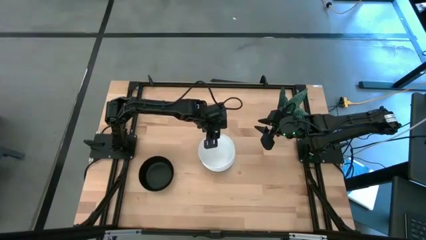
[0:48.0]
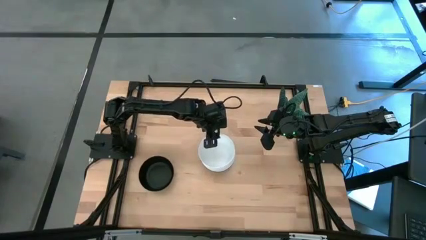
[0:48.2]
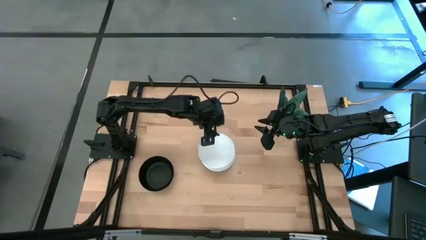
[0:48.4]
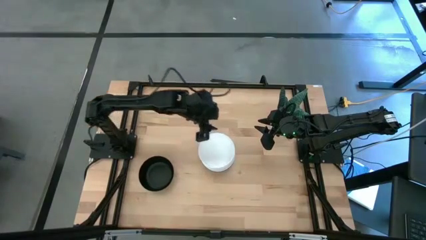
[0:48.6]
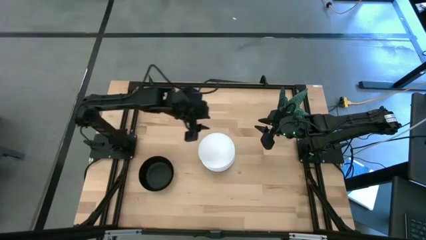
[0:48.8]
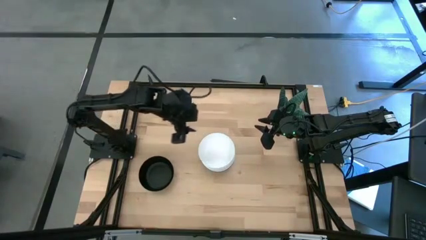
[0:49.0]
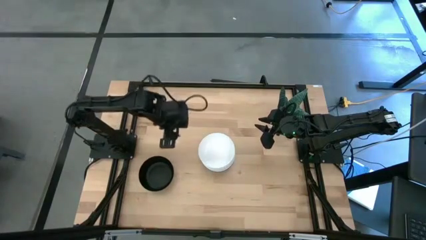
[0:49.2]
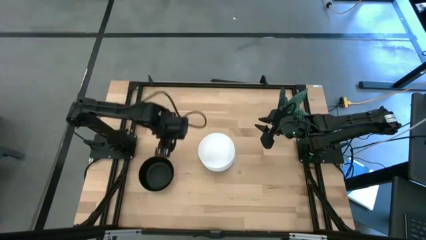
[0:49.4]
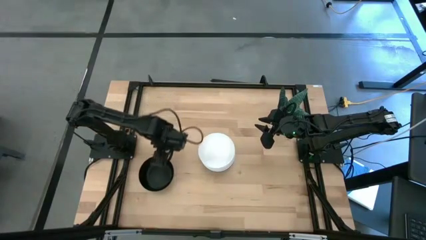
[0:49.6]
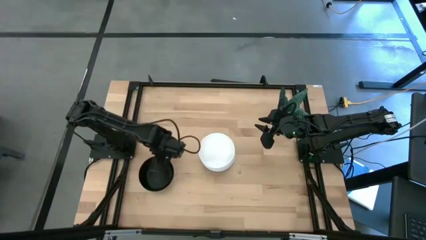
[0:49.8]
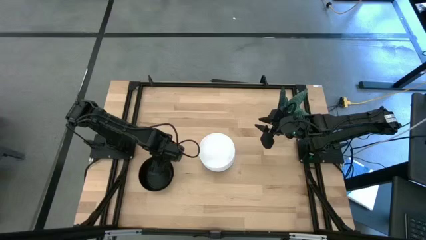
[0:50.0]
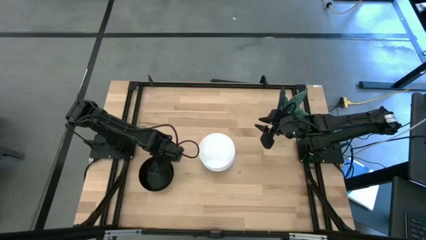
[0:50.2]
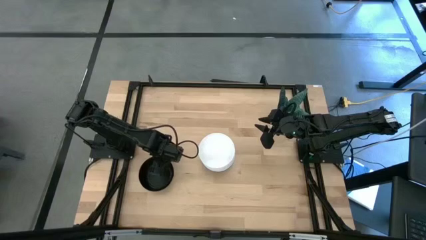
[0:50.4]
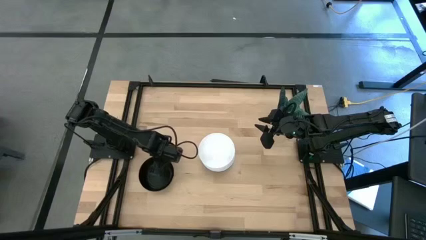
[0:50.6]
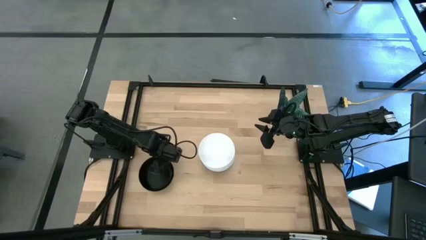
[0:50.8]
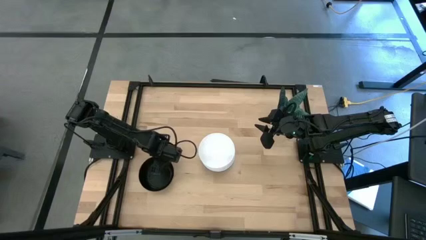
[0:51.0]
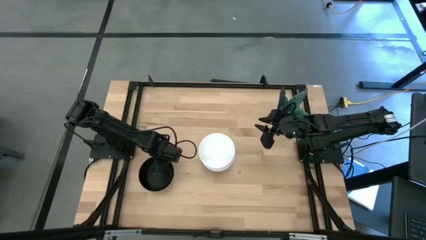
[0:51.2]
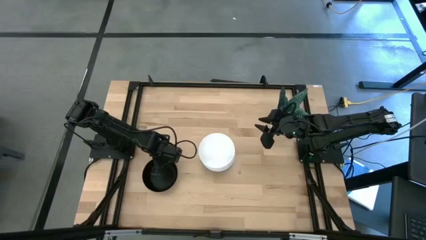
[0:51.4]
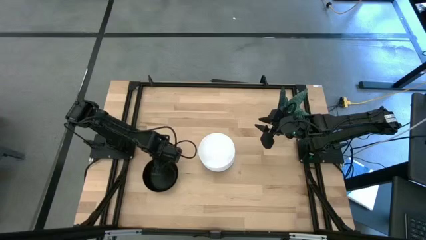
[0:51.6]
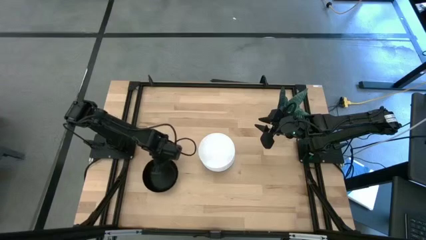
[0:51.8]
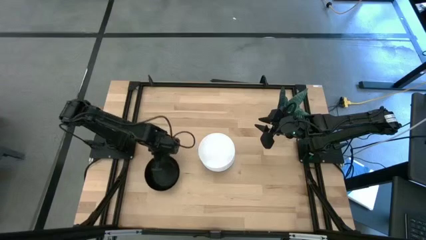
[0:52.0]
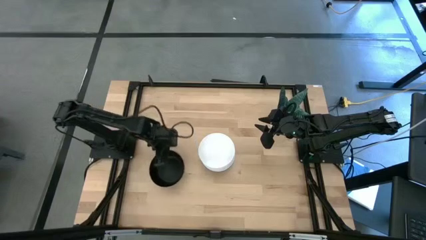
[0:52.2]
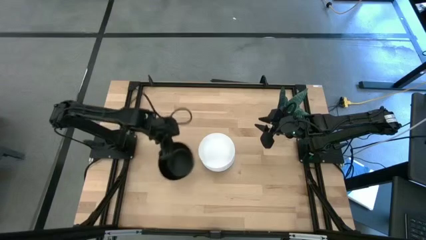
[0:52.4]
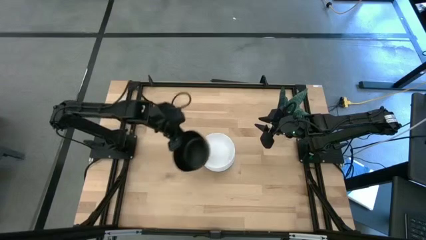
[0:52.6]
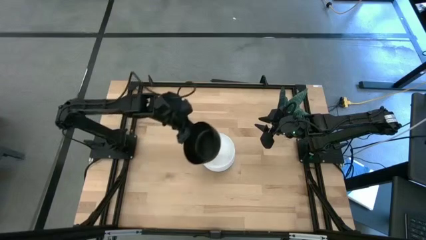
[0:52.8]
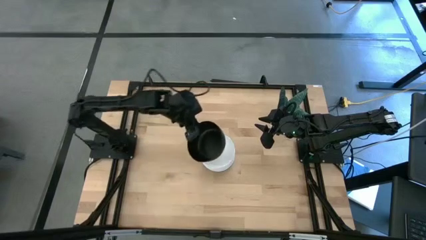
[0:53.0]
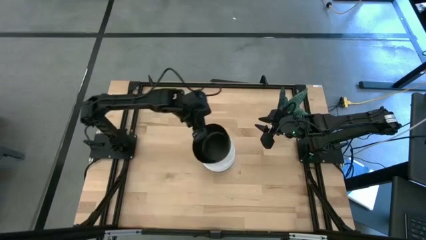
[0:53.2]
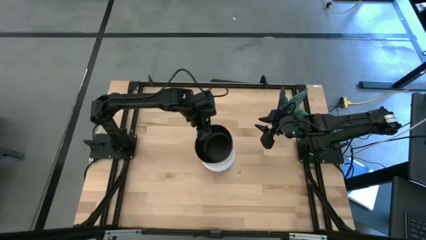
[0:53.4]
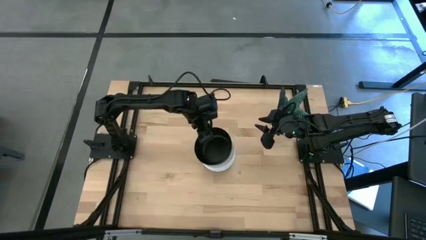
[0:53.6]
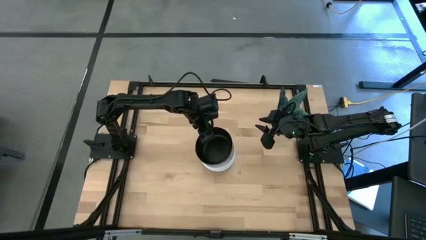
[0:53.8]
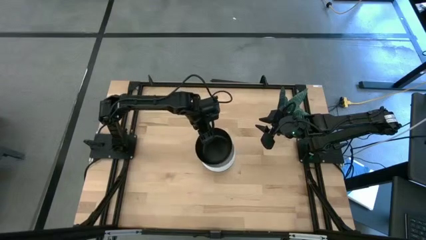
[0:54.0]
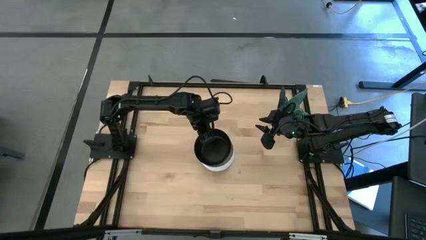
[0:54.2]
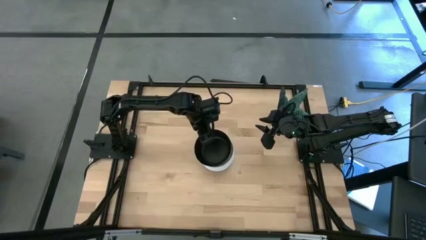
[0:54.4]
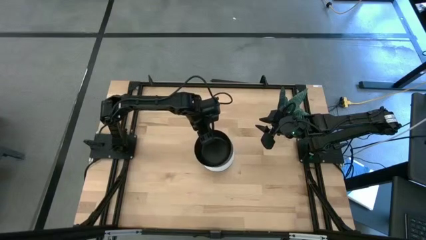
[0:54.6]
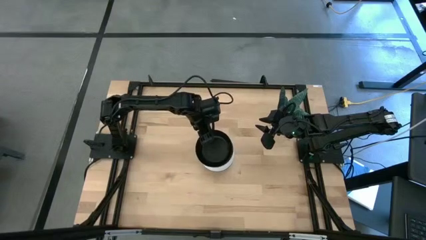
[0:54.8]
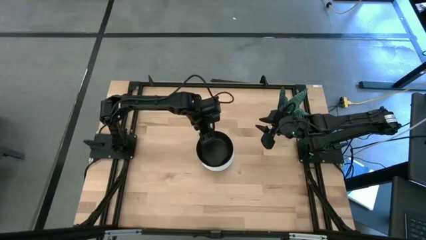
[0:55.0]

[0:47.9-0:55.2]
Task: Nest bowls inside each other
Stack the black bowl on top of the stacked bowls

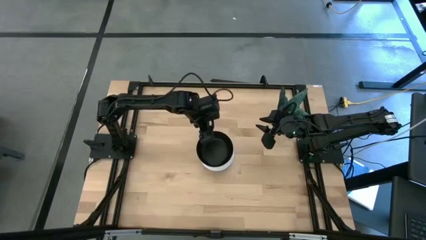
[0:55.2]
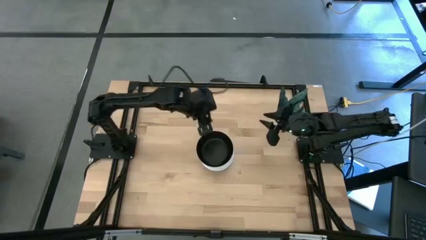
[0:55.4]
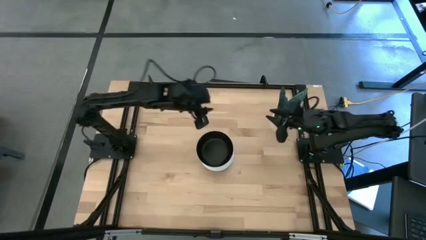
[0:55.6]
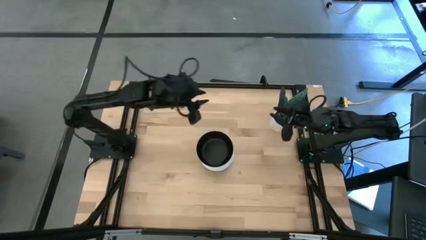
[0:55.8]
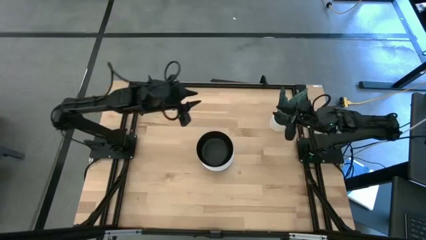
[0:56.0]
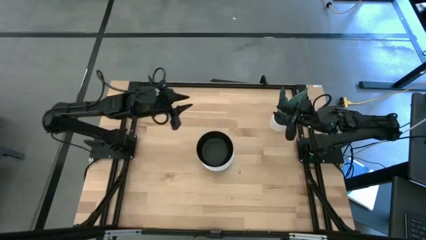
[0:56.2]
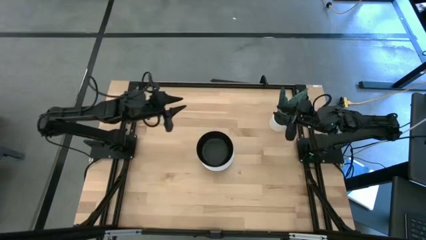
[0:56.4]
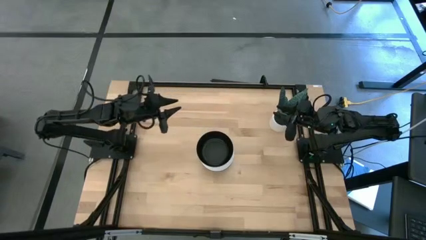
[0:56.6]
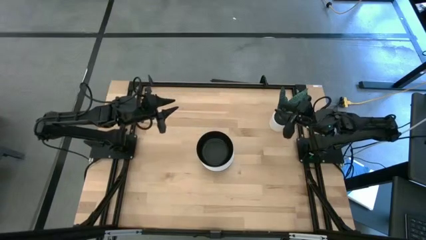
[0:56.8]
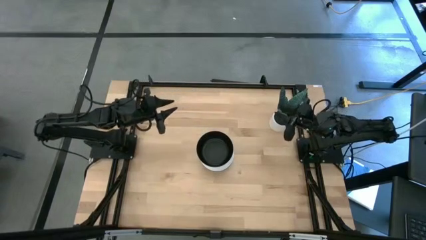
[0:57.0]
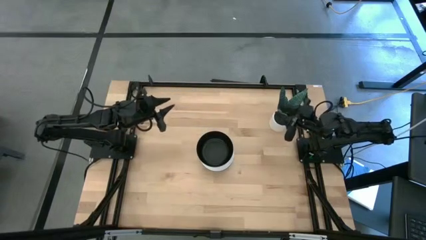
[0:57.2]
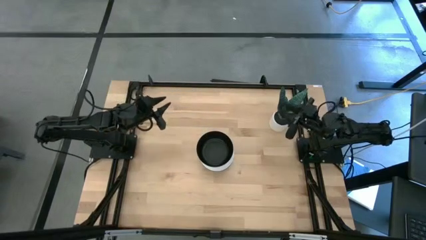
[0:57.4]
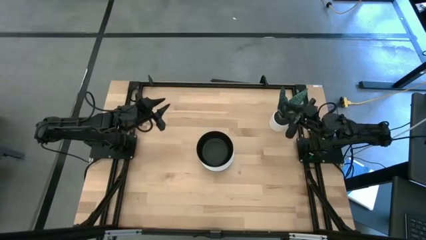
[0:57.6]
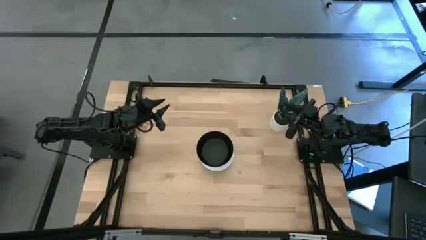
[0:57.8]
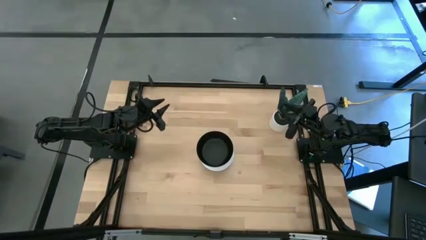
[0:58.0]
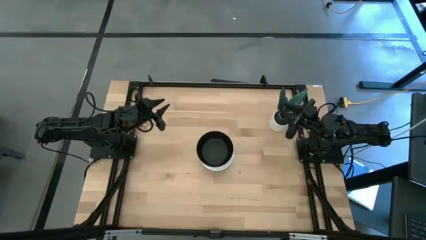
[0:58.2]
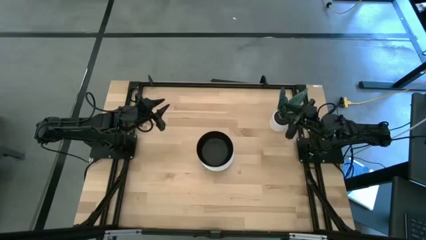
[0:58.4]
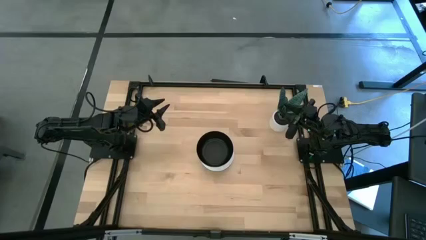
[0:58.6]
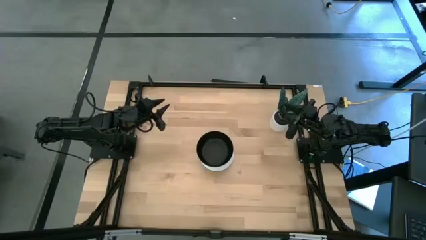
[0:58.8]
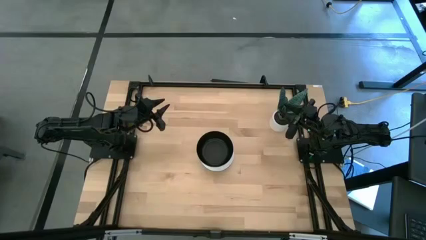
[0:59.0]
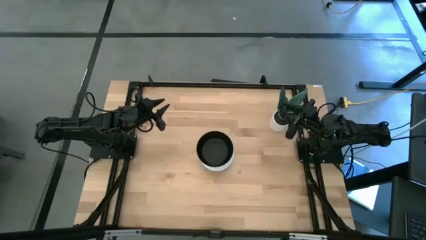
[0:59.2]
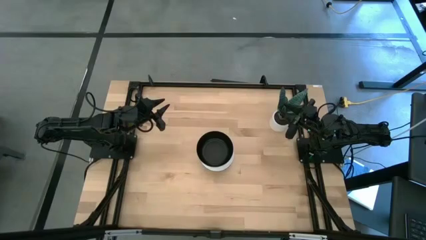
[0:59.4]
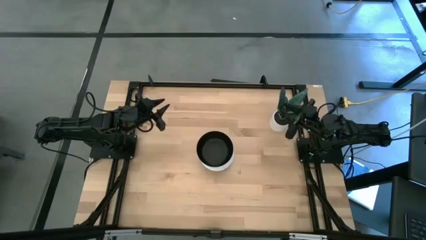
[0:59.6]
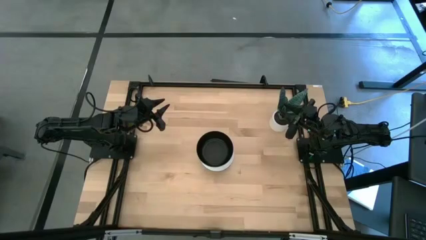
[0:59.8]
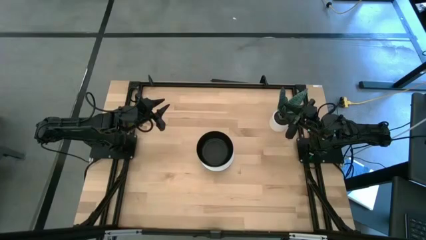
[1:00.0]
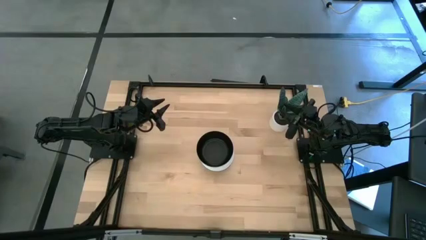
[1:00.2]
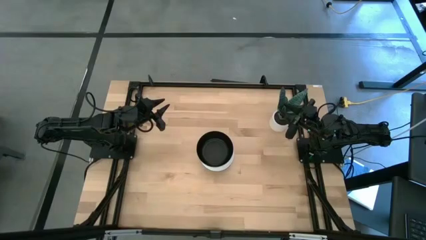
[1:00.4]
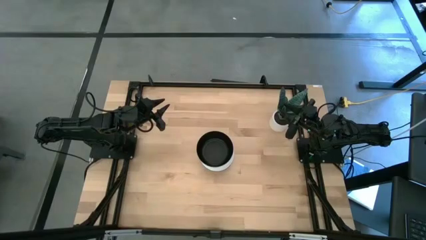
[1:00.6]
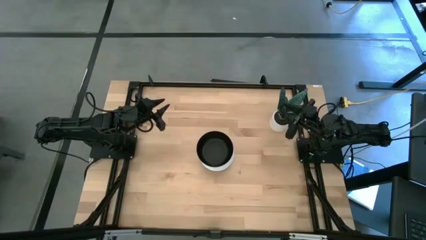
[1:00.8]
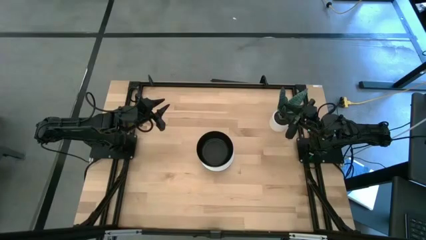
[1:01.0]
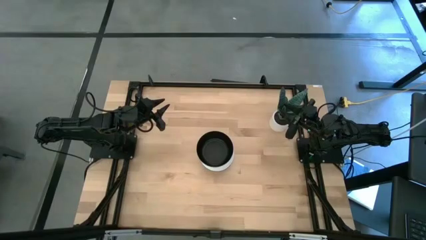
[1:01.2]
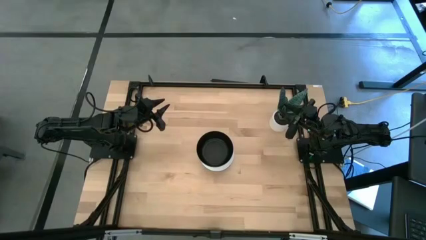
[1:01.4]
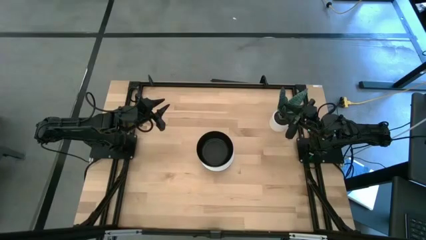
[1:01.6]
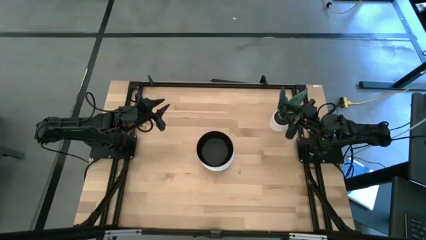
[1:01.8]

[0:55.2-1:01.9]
Return to Home Position

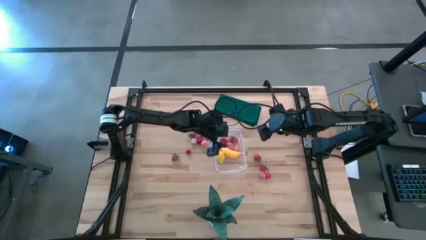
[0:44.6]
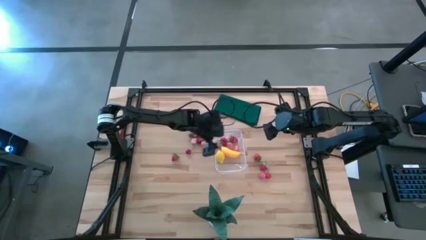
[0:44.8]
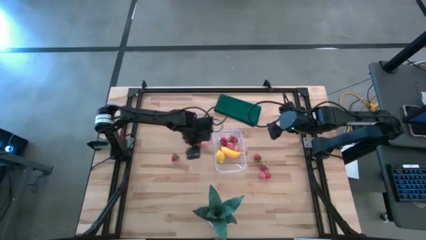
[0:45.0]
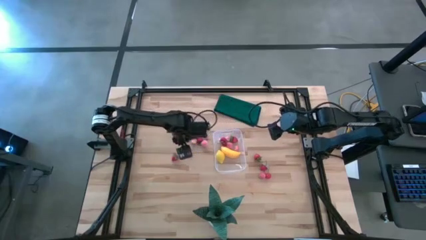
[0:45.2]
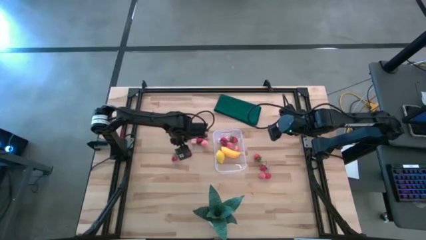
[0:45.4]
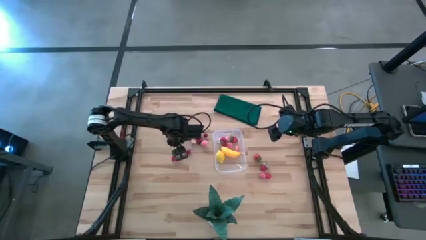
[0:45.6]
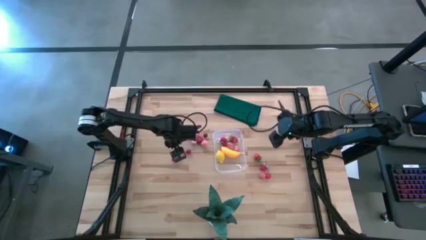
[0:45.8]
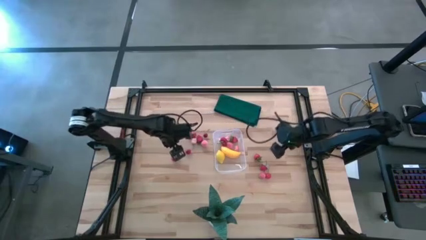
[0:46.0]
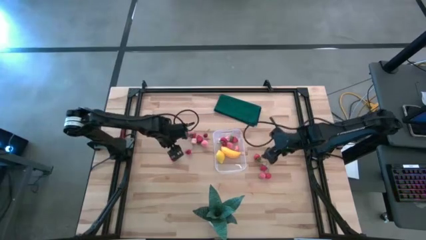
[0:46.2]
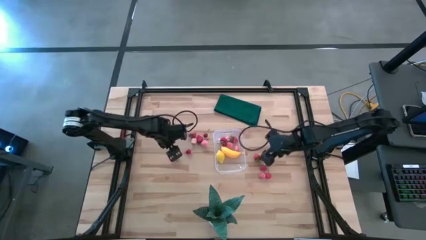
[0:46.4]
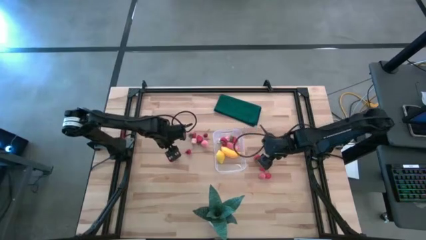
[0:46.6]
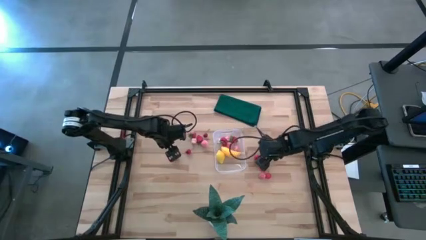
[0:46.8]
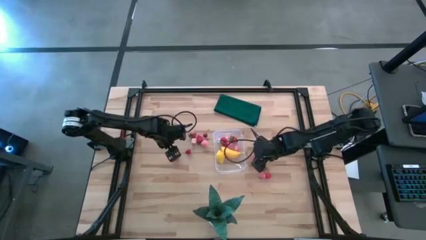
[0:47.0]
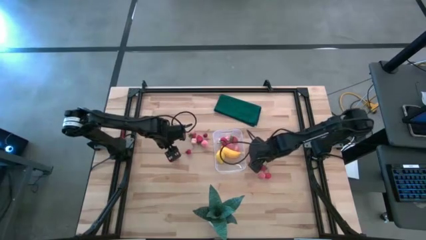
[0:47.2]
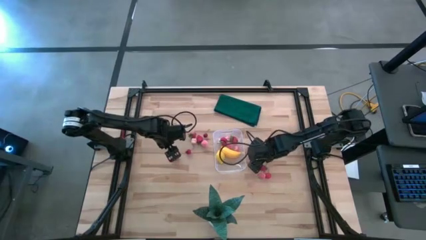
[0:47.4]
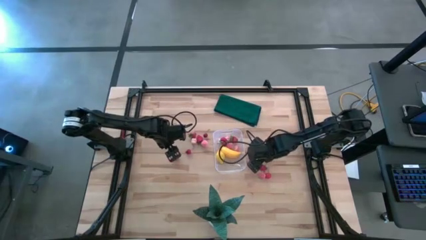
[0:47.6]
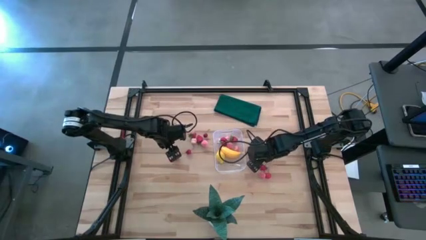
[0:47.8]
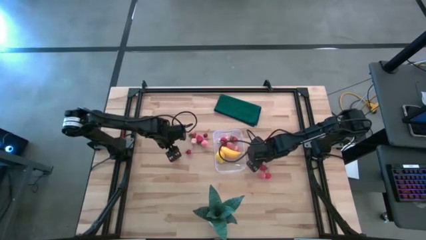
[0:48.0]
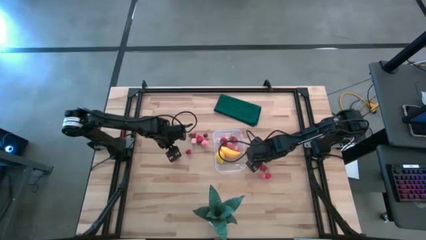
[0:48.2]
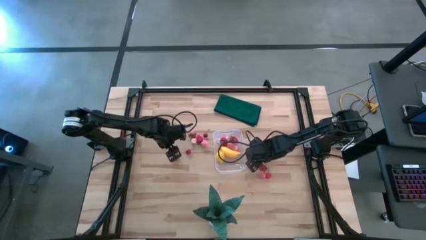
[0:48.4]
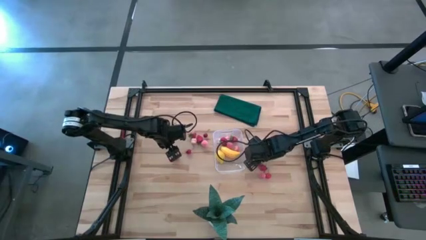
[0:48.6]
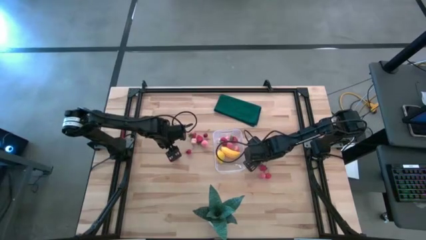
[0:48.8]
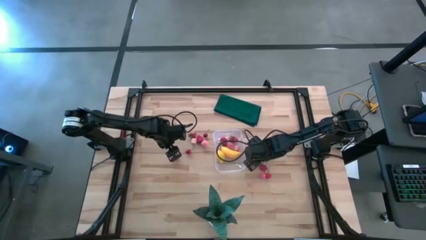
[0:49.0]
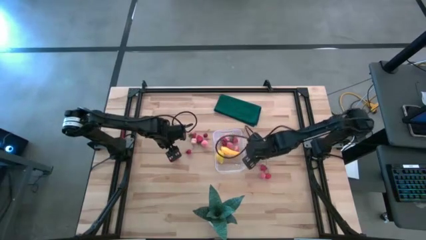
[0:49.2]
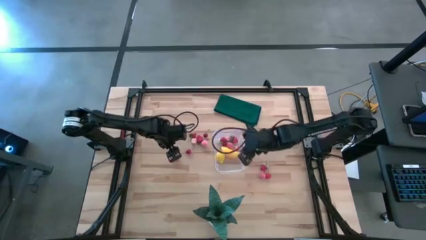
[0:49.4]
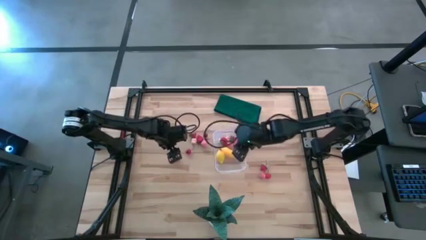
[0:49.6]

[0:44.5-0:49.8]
Task: Pick and placing Produce into tupperware
Put the strawberry into the transparent bin
